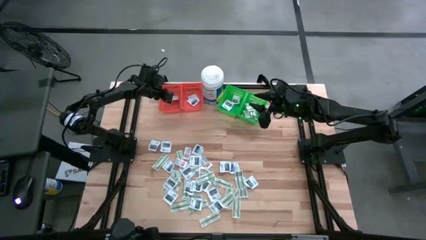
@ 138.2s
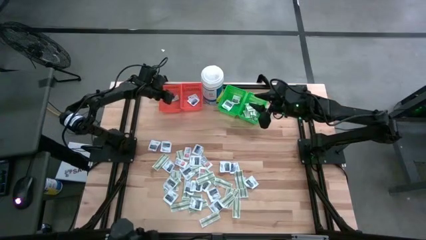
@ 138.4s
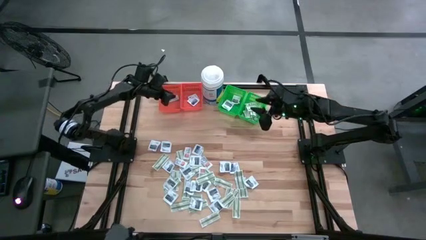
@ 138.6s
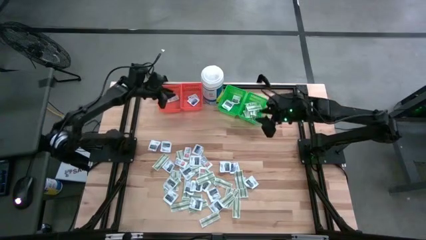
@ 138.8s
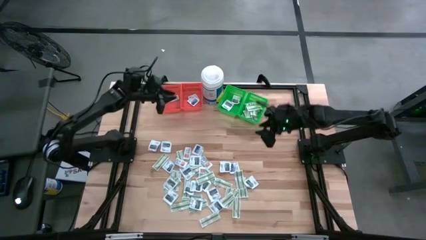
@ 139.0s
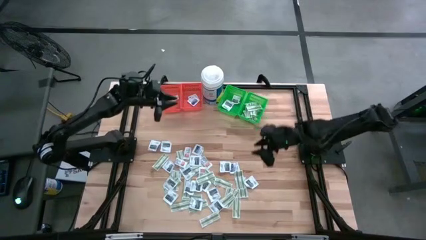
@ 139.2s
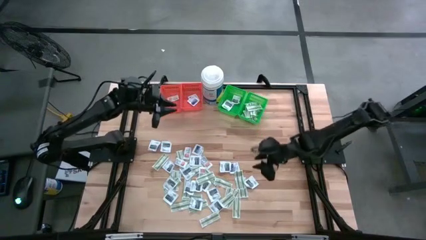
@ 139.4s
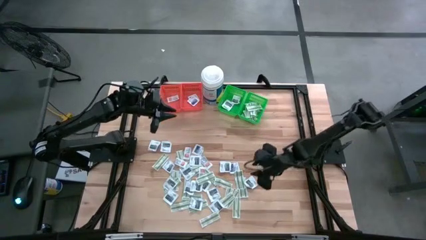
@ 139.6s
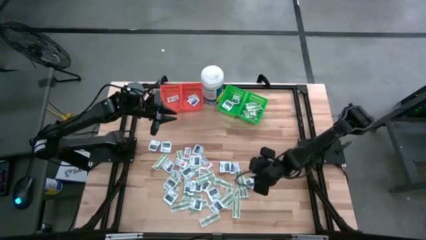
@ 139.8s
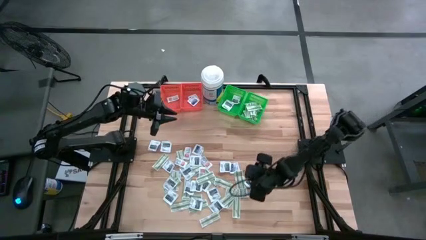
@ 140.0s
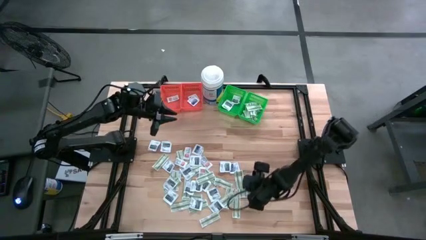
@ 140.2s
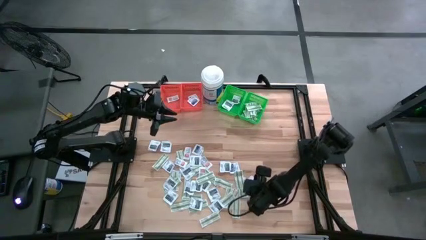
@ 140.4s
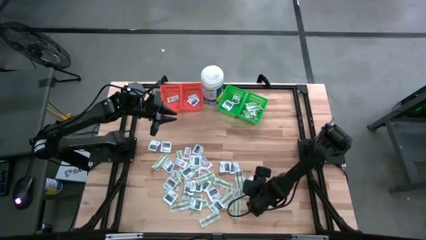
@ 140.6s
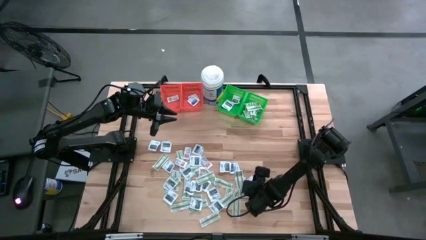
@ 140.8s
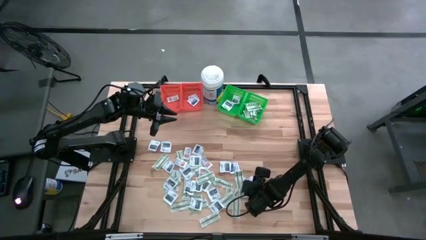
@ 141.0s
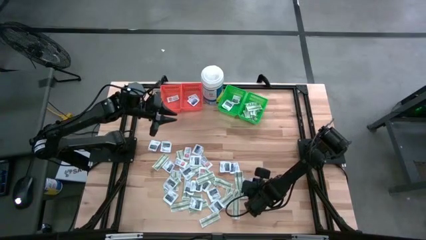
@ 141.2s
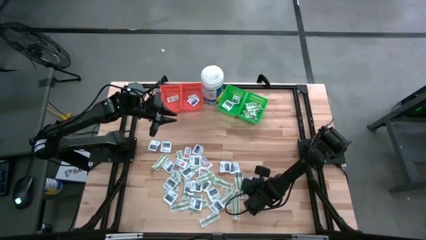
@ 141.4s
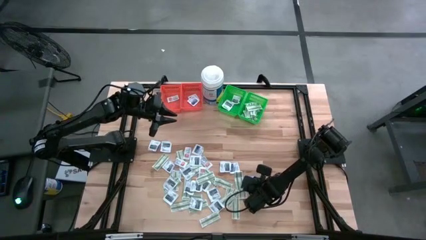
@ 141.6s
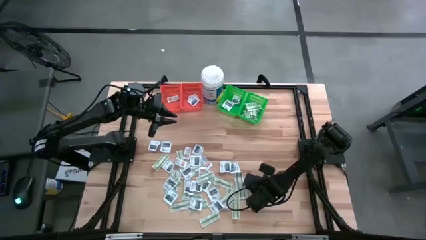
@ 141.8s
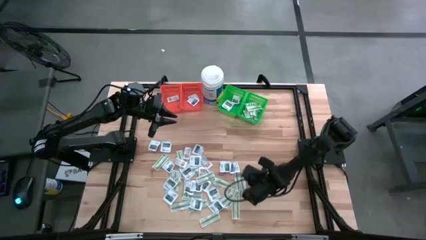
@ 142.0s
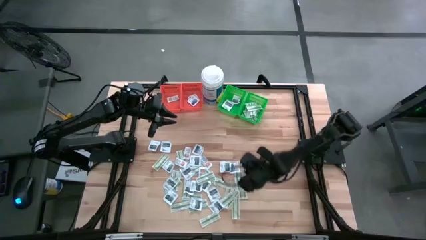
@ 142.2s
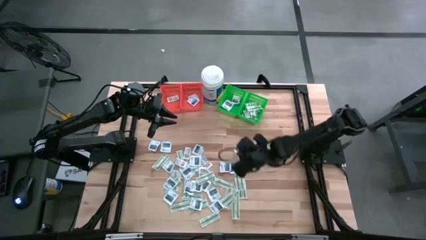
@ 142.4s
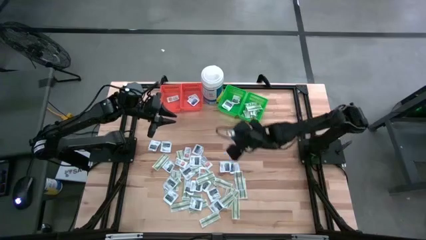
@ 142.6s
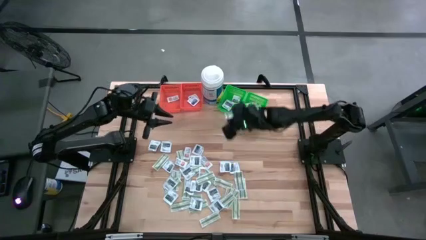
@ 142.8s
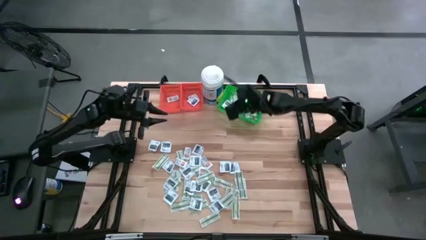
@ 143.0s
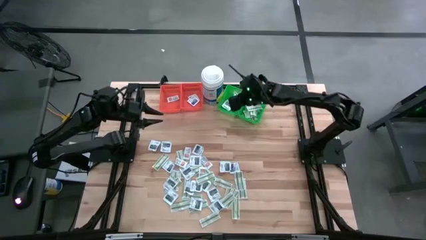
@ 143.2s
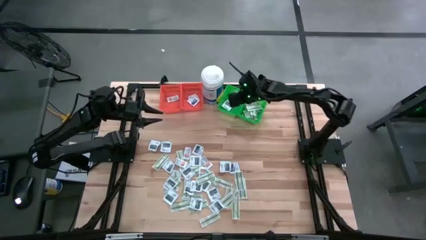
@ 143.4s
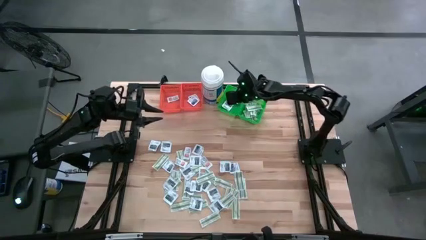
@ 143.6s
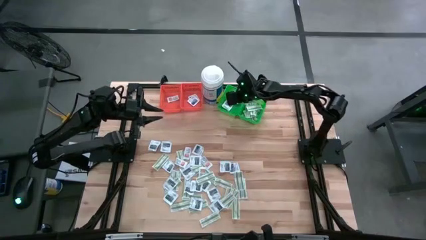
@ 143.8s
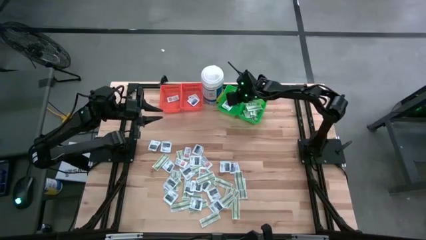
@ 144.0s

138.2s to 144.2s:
Task: Pick & Place First Aid Supplies
Put the black towelette pack into the left green bin

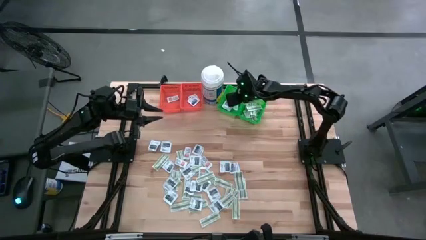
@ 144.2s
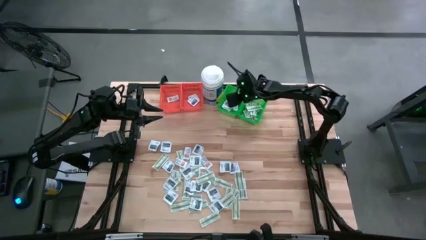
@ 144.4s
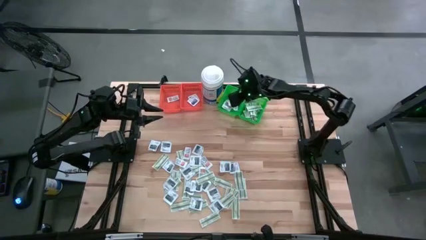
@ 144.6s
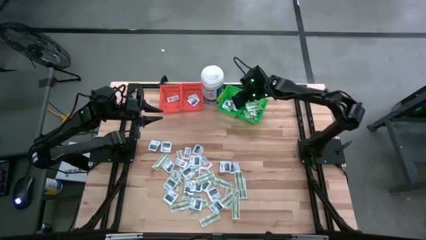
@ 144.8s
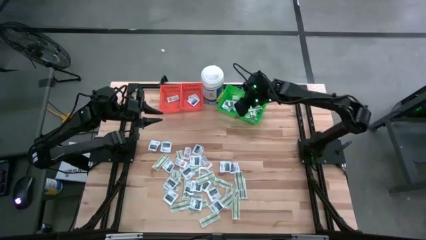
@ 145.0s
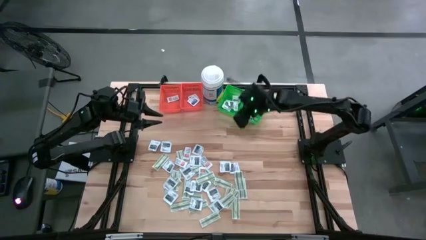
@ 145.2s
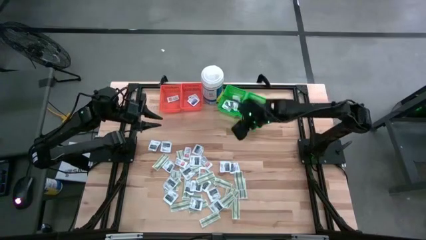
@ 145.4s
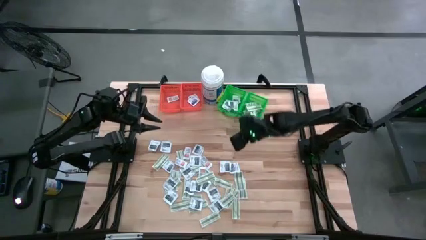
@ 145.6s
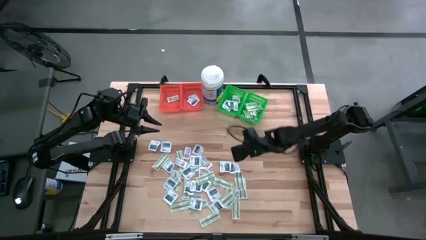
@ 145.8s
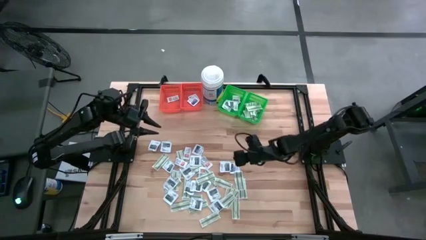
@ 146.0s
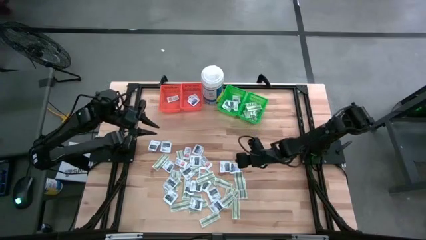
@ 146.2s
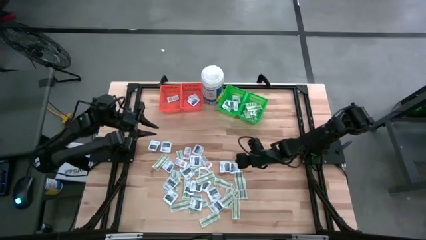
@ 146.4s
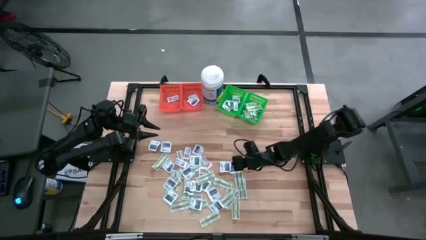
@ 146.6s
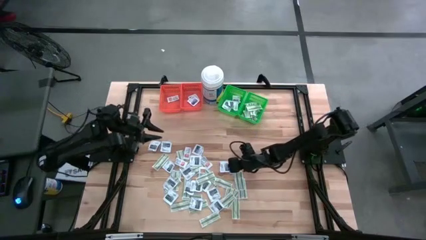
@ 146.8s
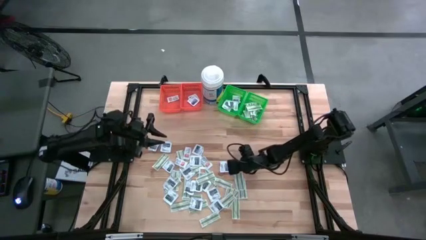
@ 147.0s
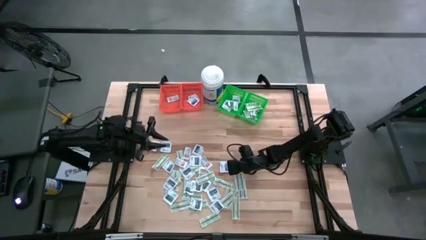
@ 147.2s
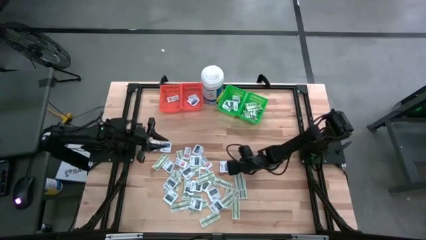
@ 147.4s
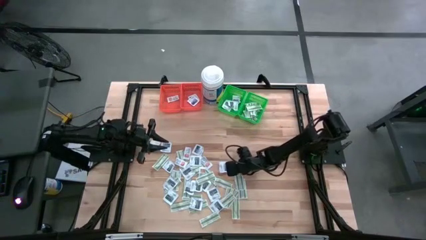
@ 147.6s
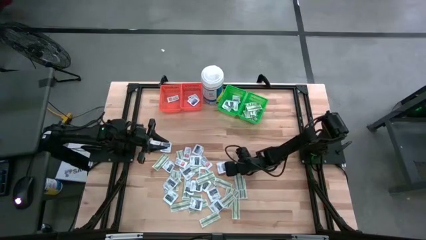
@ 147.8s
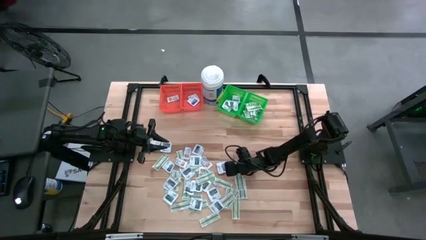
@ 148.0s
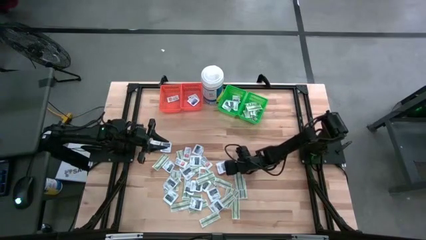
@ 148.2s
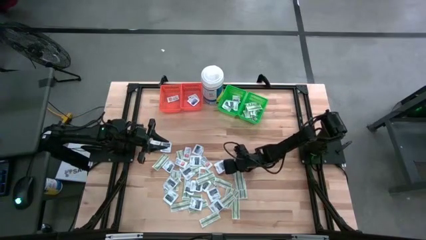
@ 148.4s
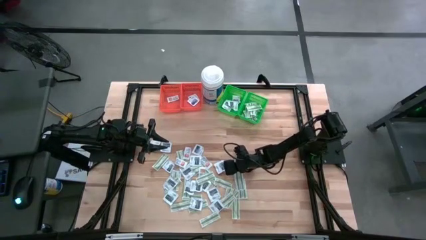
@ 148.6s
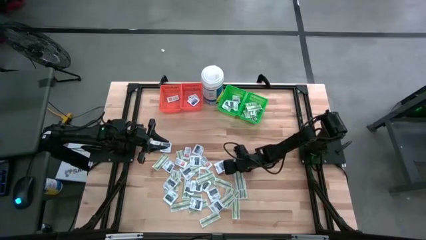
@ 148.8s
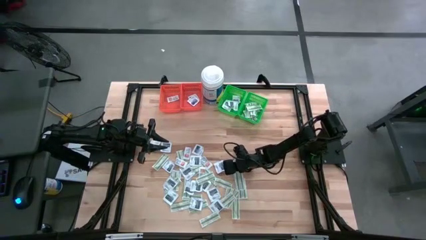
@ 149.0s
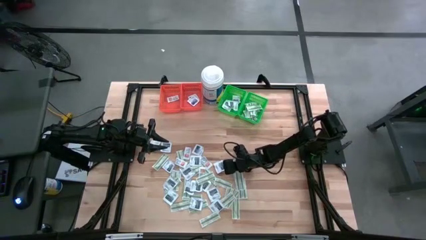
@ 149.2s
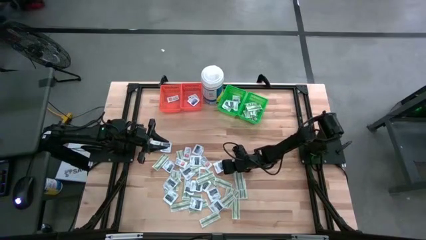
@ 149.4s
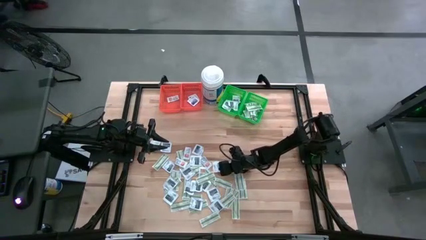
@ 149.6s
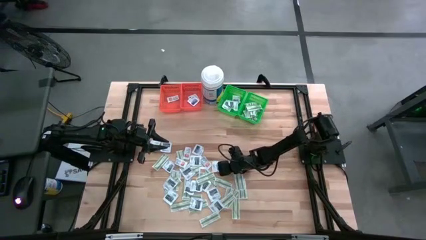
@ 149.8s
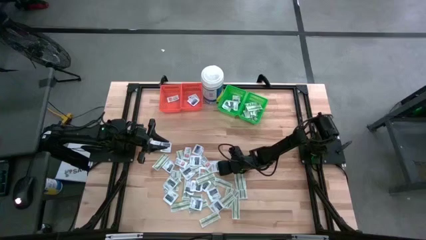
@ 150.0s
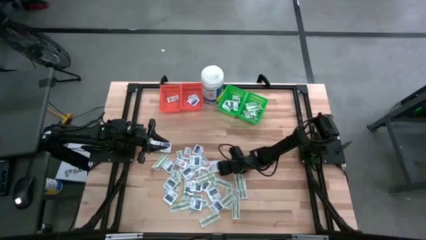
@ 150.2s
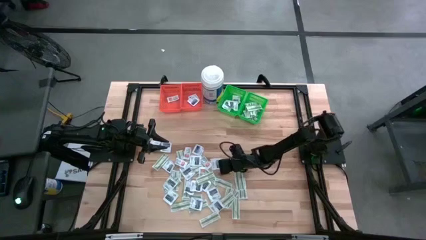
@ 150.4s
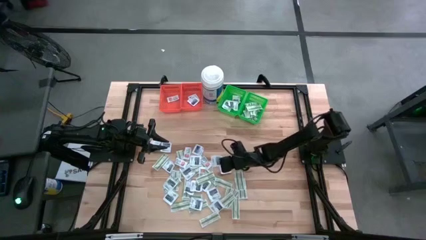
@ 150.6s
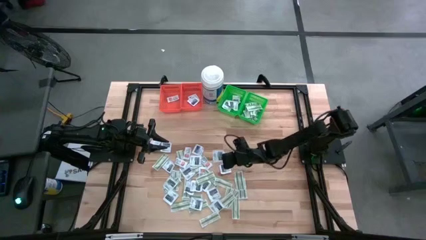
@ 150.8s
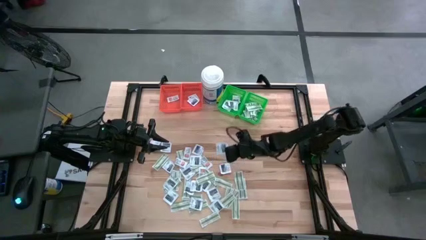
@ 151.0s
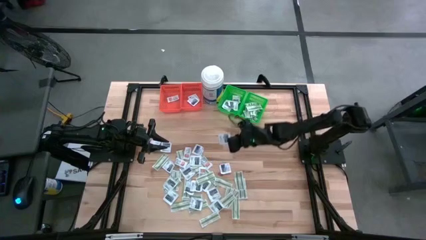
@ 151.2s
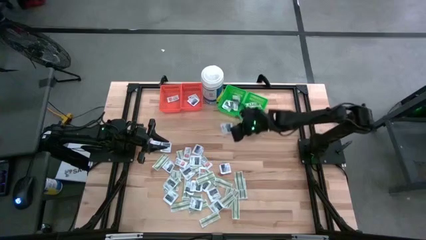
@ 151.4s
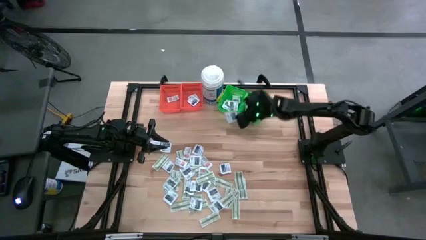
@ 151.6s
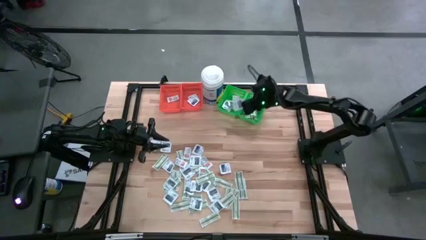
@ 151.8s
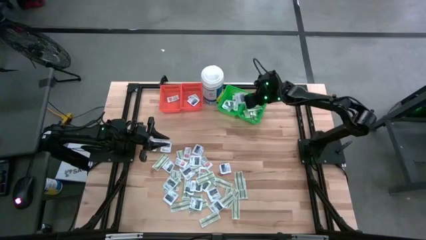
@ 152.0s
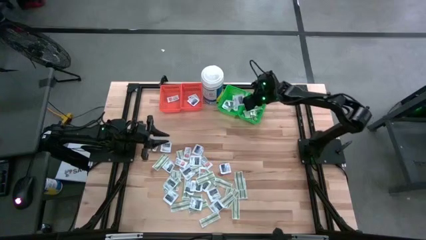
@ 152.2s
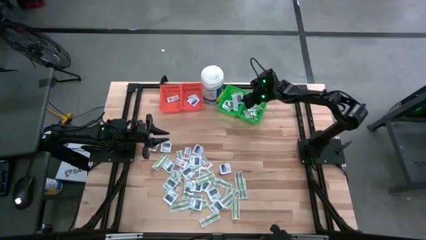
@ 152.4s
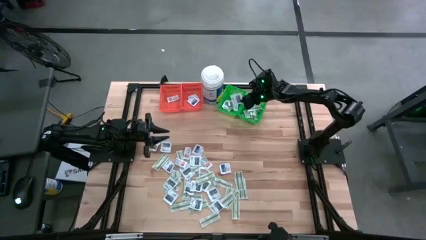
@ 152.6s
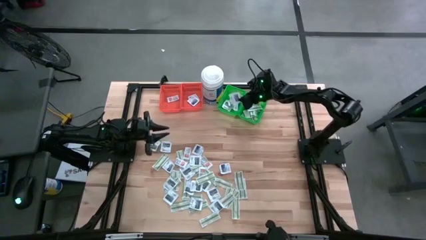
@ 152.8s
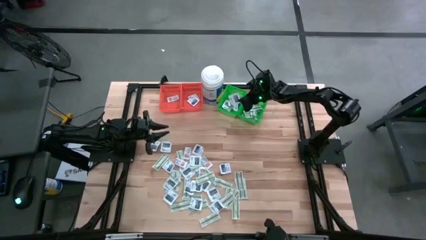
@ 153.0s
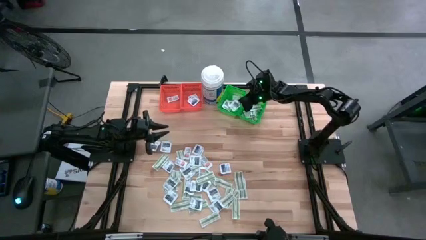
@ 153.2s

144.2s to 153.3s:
Put the black towelette pack into the left green bin
